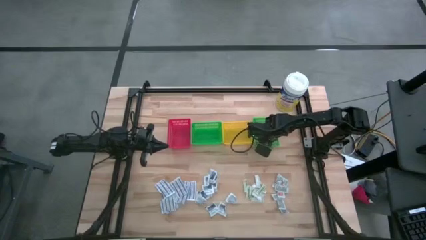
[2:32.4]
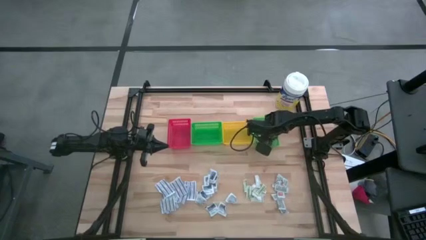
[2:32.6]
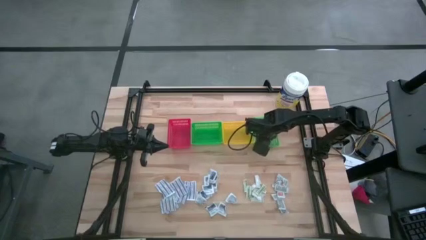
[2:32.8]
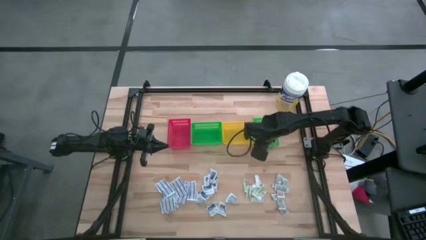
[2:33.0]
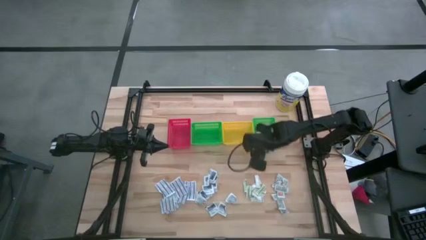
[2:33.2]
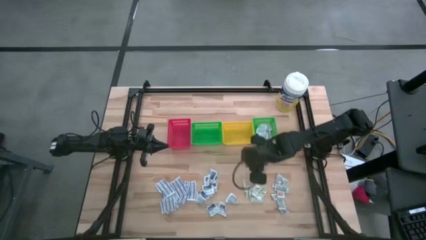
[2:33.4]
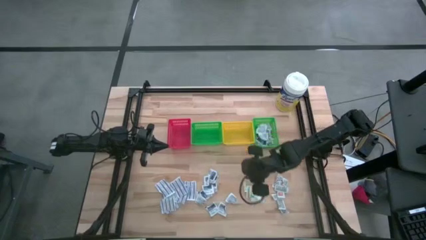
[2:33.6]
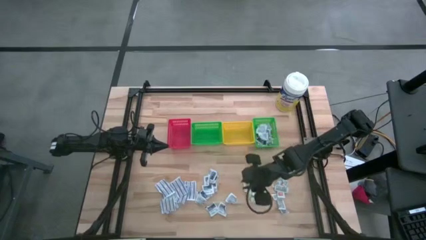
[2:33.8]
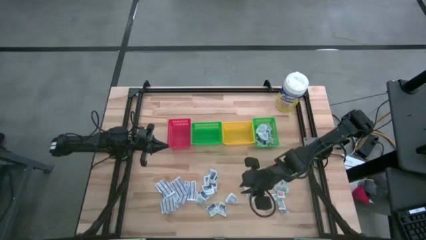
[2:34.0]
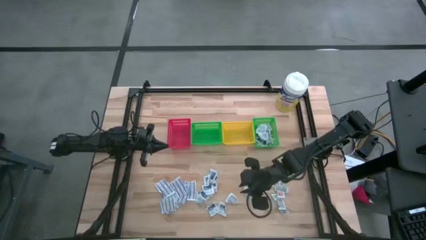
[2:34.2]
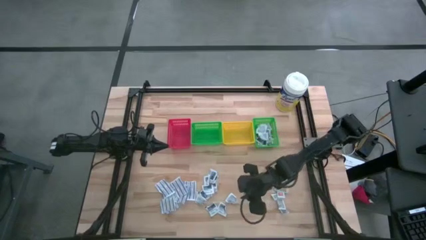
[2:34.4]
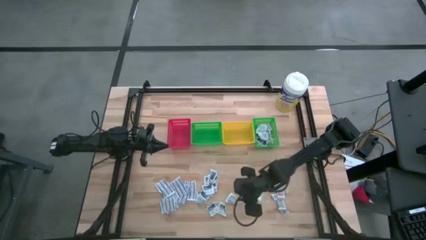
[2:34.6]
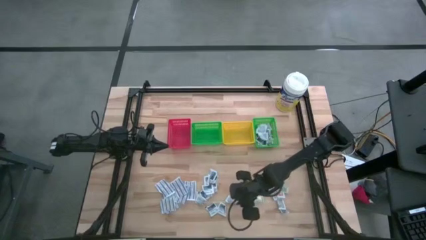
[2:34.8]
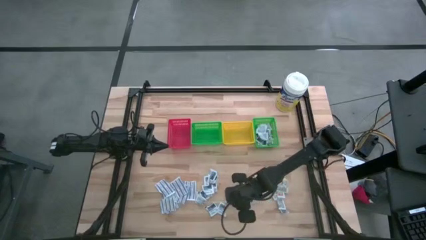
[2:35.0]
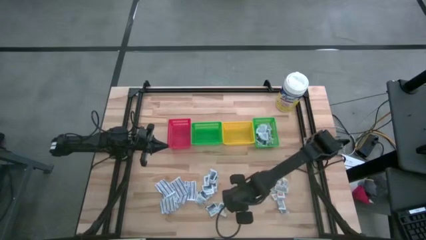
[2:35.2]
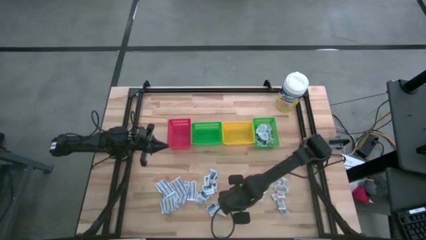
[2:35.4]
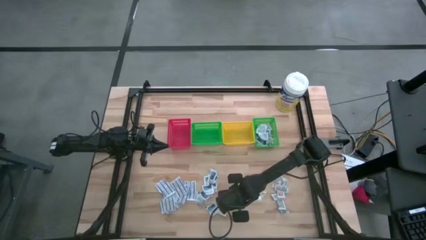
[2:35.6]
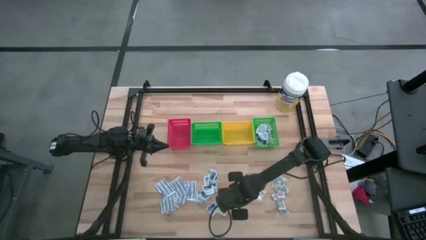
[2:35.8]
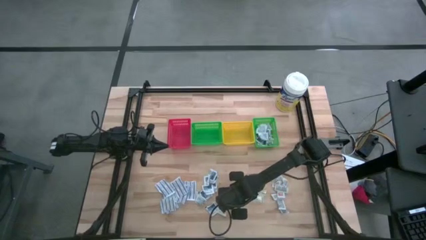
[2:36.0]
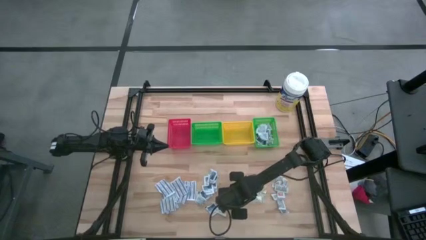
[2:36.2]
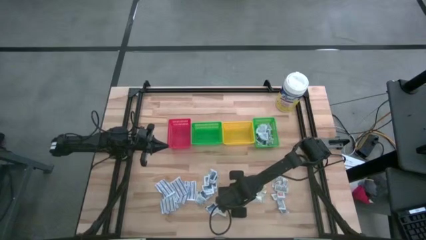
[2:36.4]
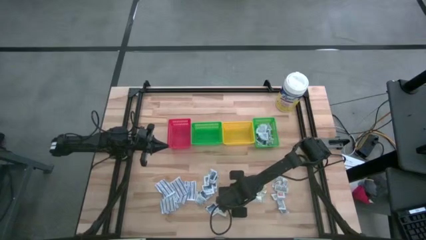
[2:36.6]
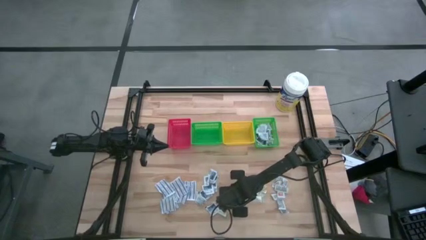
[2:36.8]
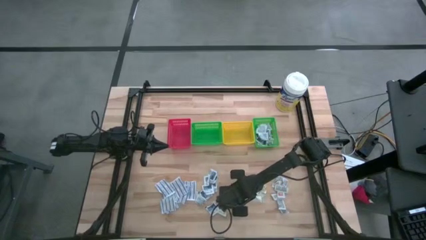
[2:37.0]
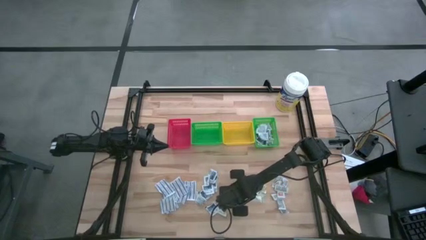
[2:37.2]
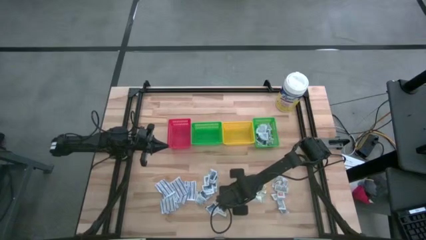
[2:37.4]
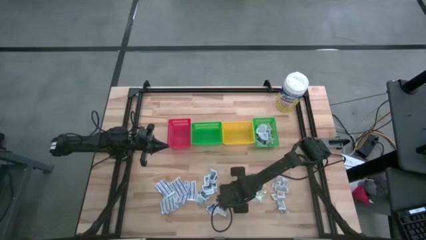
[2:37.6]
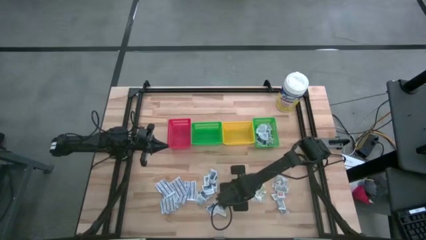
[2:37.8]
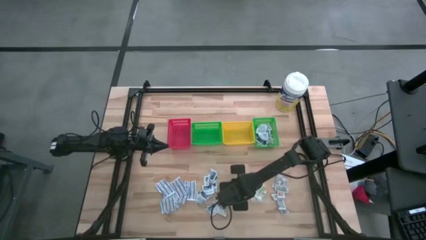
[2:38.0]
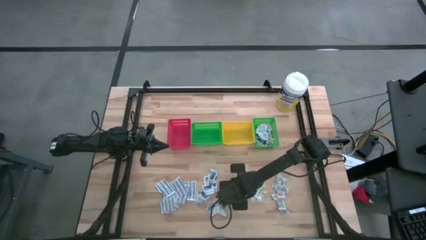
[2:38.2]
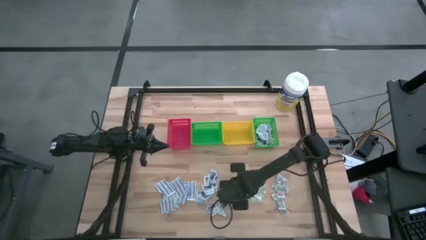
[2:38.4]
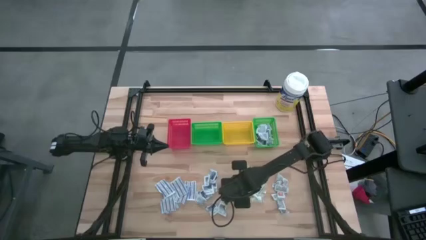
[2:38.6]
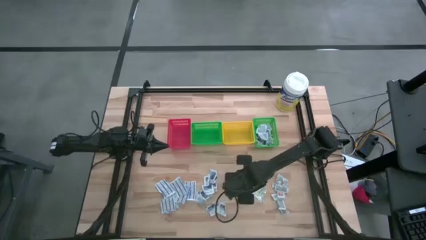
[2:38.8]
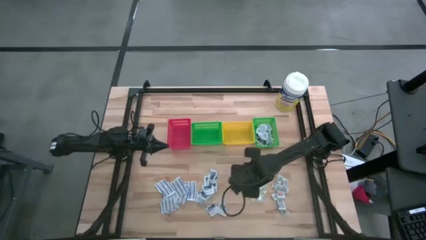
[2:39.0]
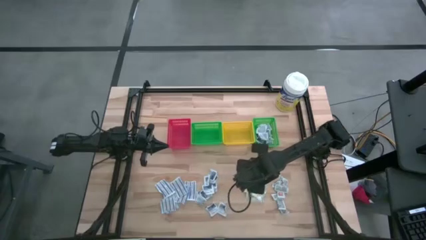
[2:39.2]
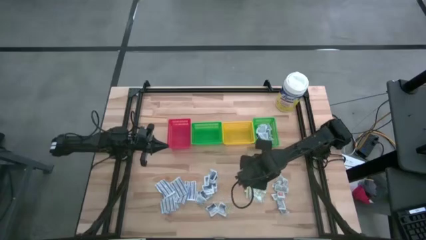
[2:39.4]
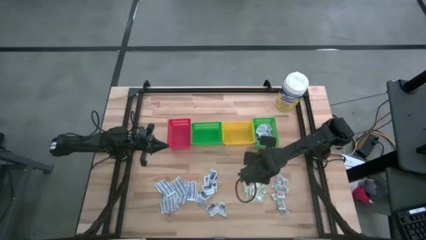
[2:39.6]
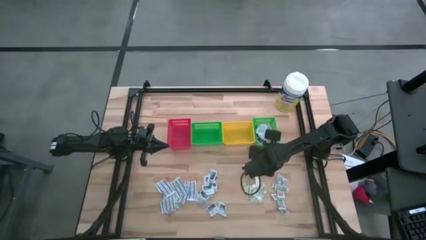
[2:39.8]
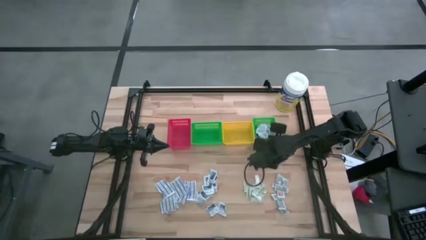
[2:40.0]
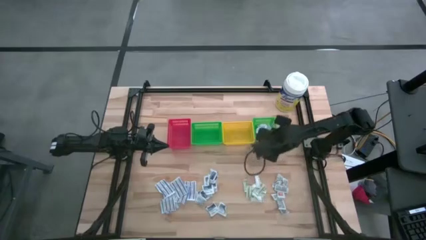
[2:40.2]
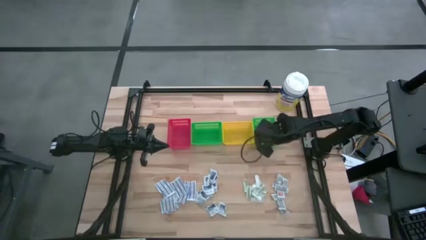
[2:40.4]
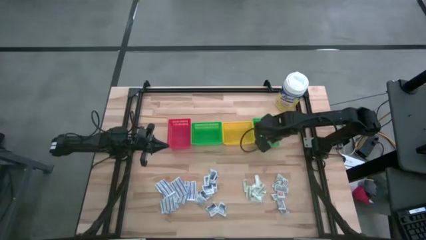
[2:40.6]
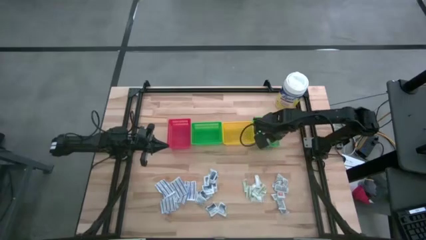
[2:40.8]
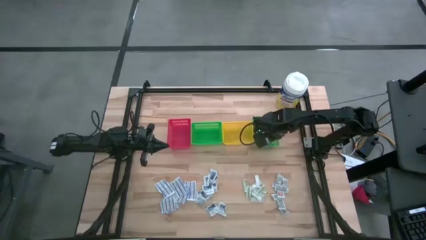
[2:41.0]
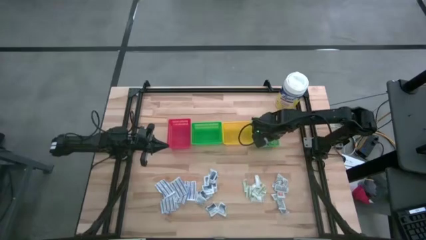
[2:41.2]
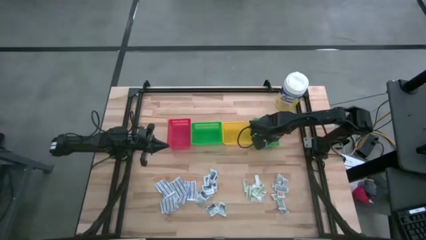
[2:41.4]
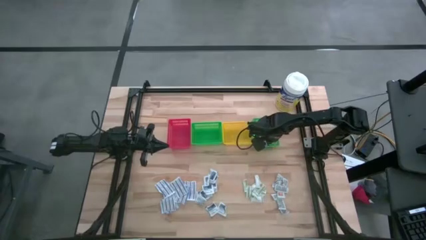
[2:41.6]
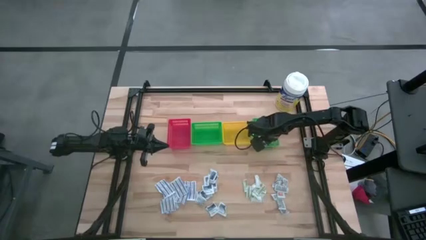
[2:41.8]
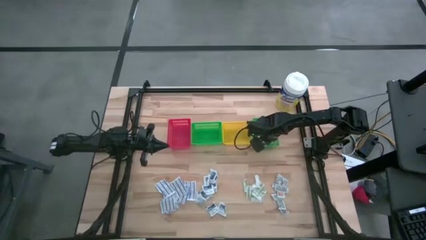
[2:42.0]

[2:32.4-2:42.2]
Task: Pick & Place First Aid Supplies
Put the blue alcohol pad into the right green bin

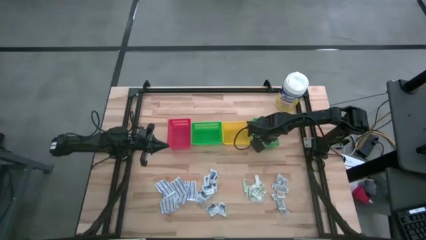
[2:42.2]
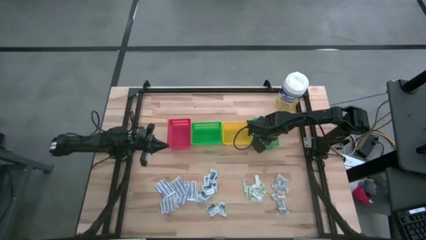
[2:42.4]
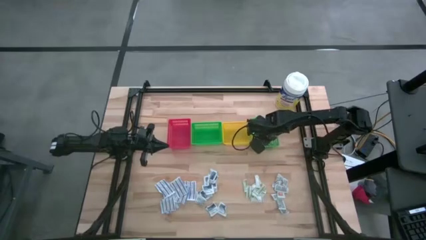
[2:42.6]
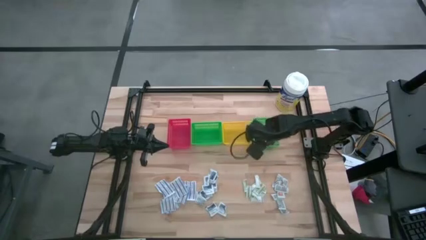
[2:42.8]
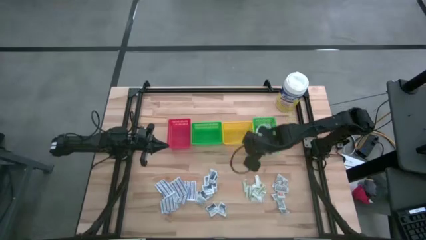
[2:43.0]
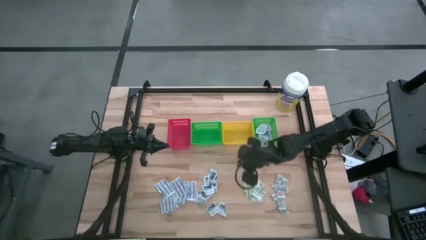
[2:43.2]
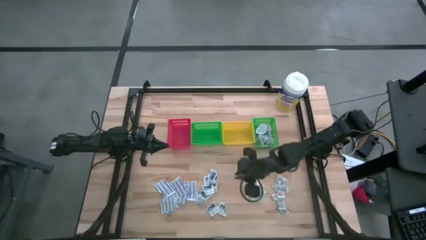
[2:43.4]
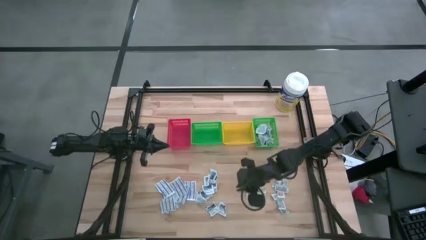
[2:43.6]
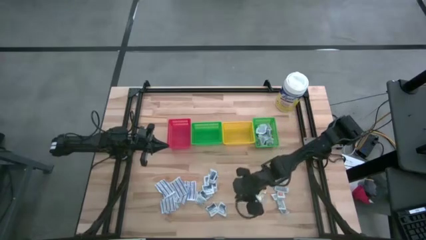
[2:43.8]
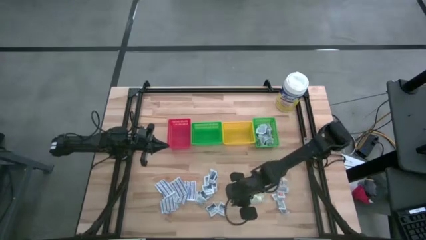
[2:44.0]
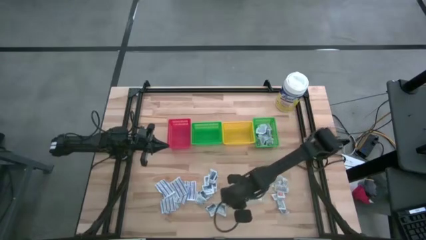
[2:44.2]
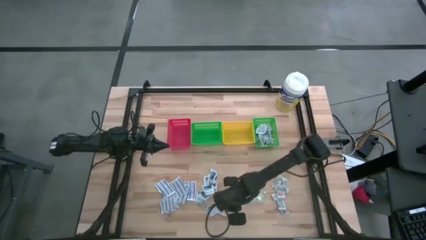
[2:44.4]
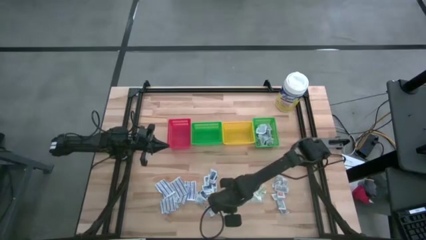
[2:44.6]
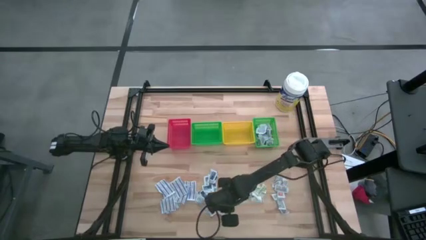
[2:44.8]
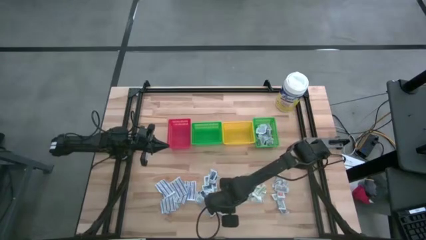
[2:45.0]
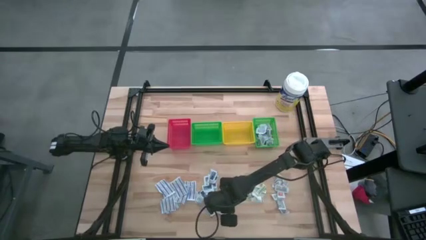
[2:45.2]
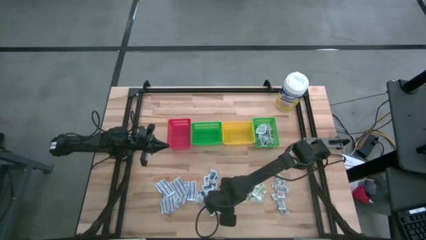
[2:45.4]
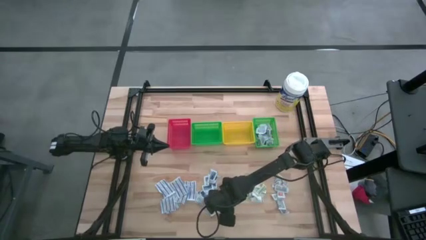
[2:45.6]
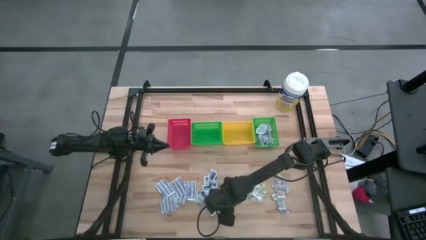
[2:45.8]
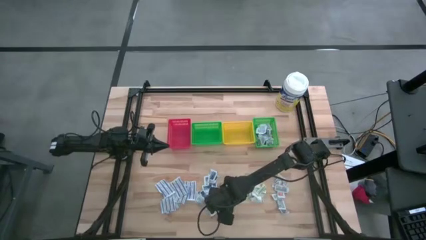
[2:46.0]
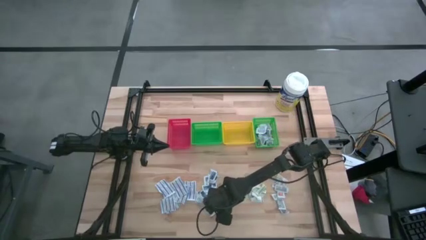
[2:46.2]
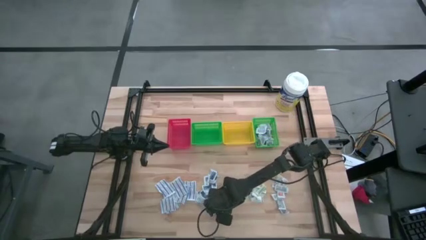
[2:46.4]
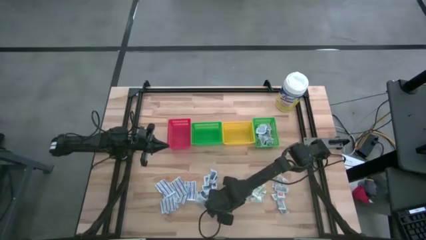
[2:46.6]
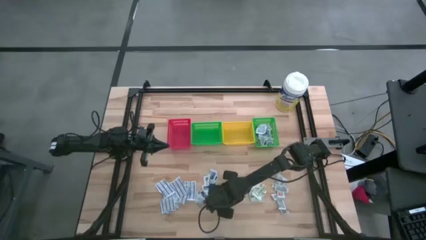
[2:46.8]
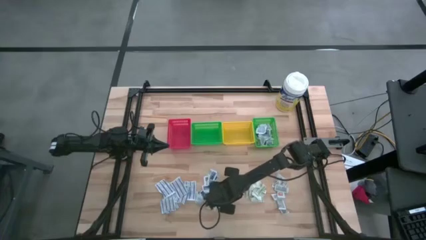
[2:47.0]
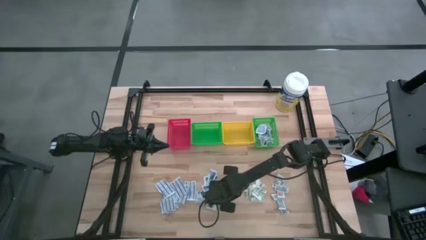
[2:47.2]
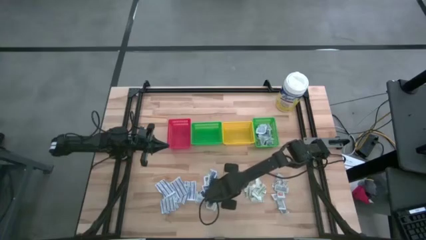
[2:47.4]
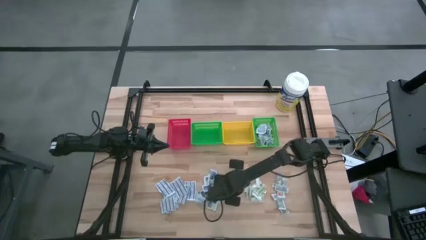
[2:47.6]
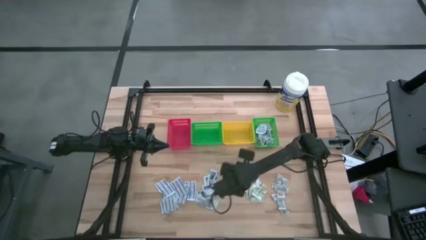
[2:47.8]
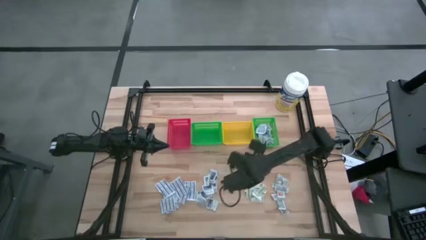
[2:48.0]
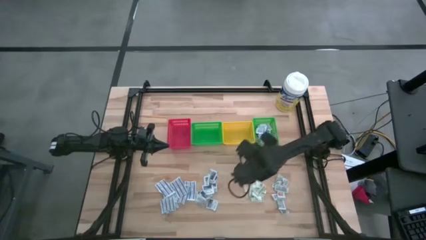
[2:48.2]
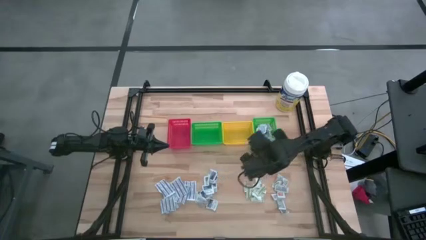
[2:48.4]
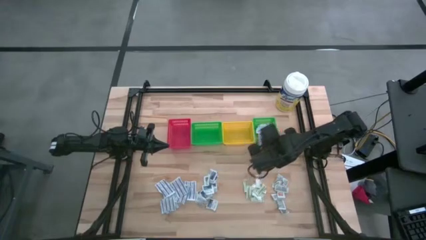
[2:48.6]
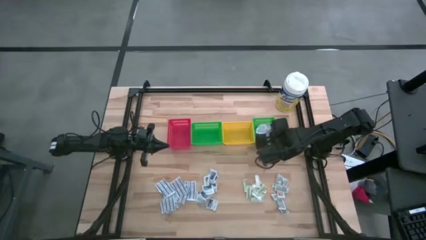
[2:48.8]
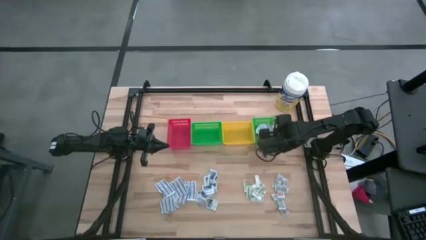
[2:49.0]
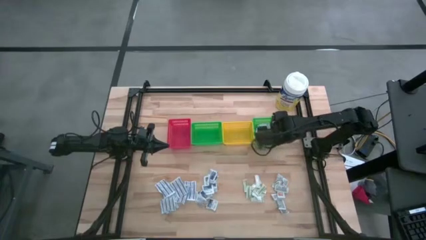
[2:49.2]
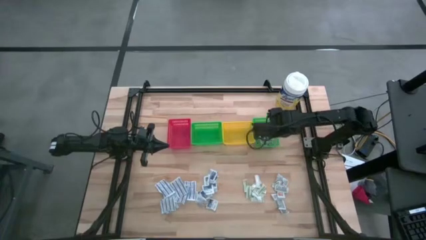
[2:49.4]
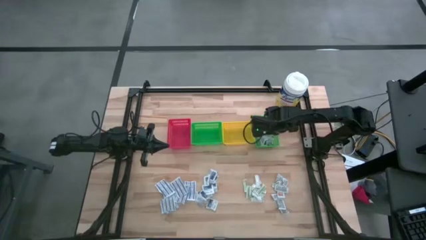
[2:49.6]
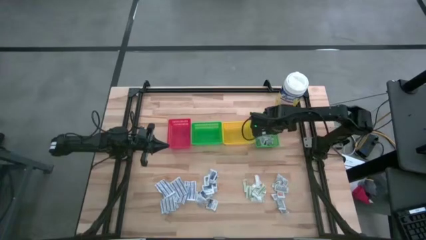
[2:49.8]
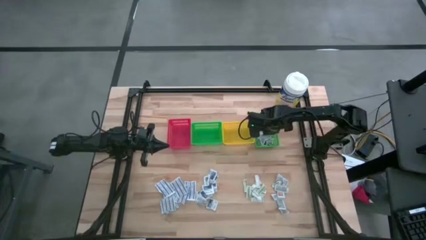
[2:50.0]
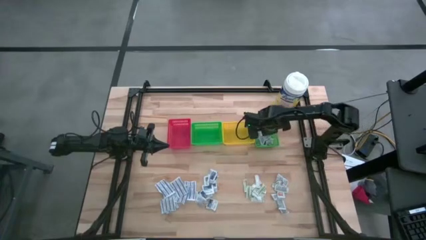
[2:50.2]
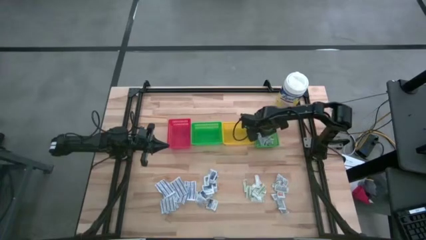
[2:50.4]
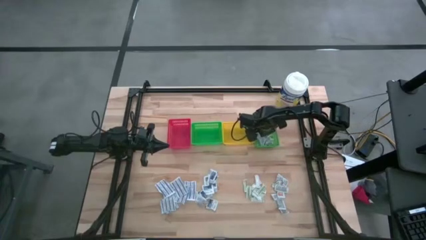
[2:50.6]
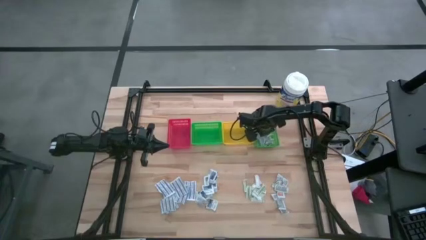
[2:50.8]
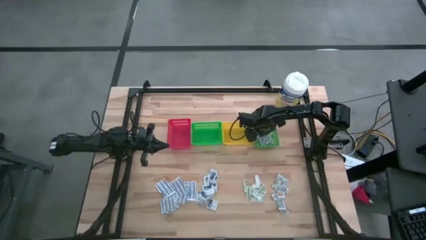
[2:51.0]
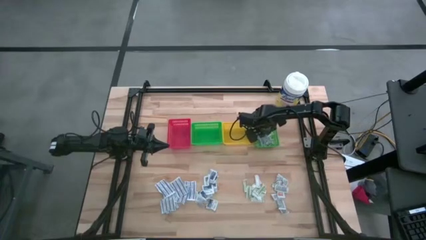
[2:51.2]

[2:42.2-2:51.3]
Put the blue alcohol pad into the right green bin
